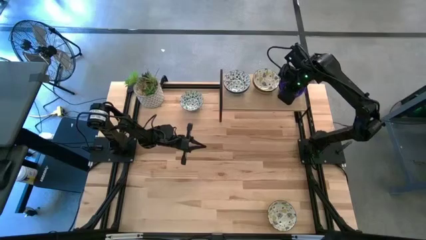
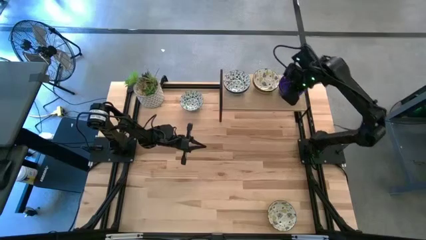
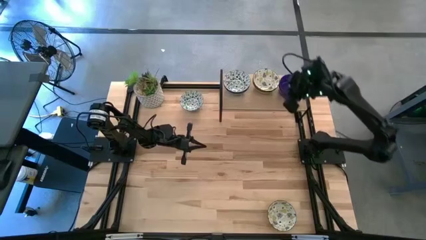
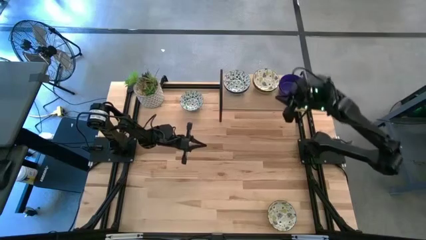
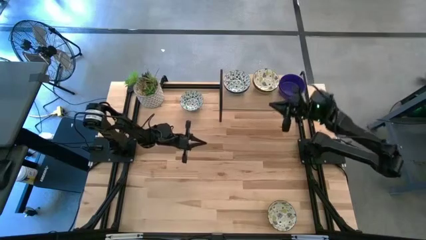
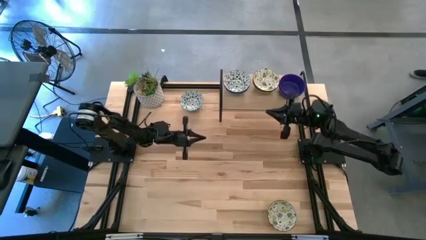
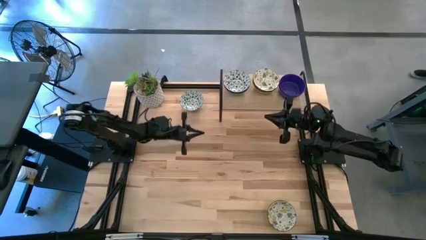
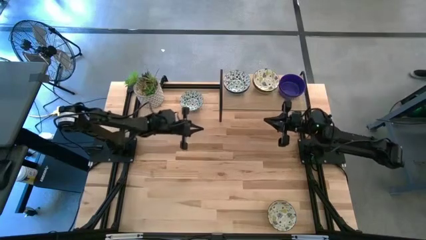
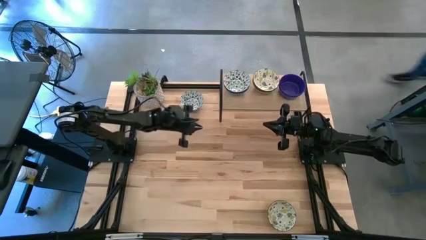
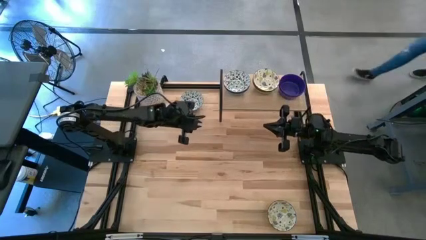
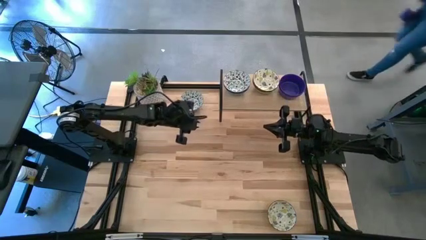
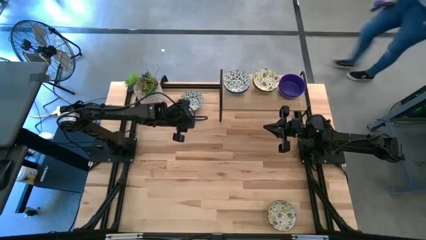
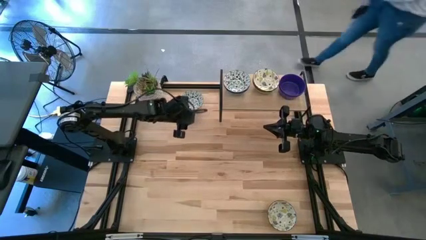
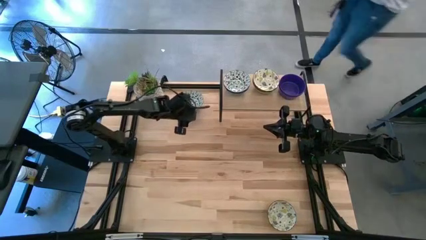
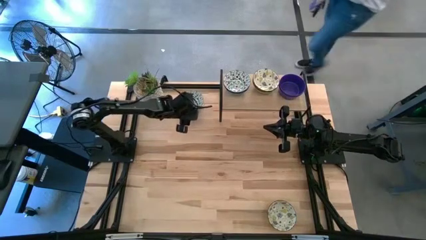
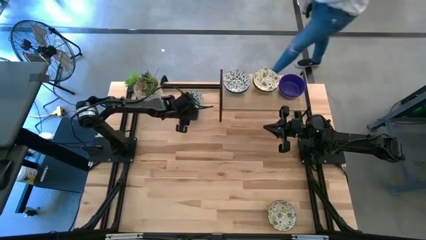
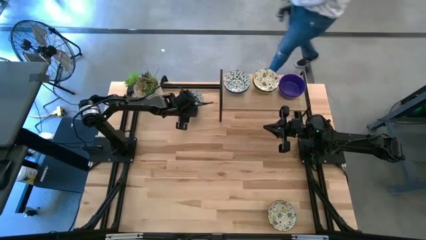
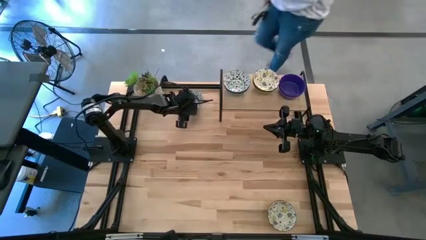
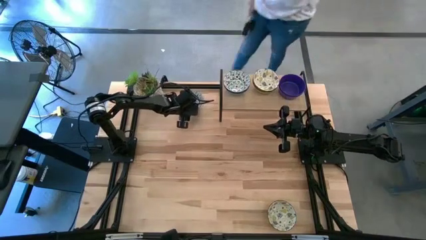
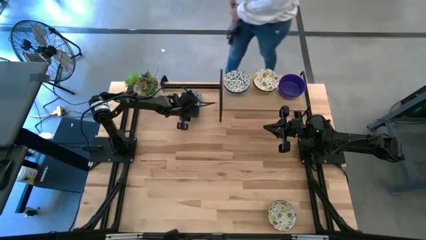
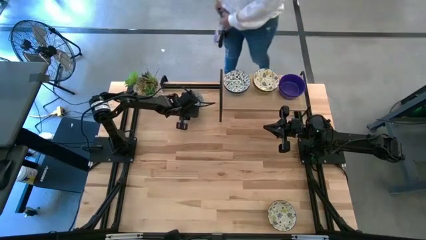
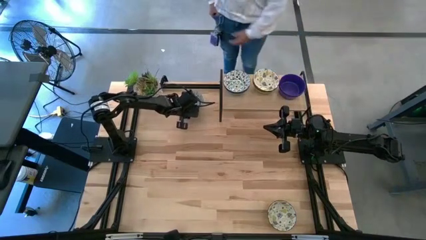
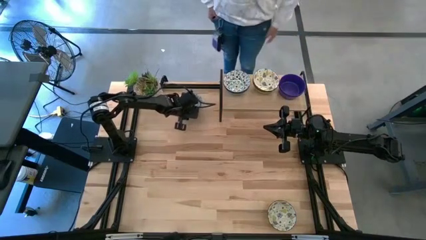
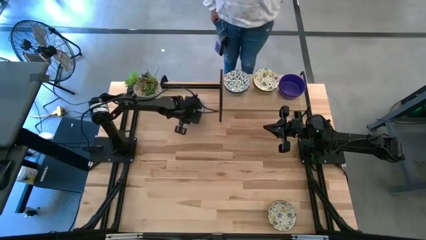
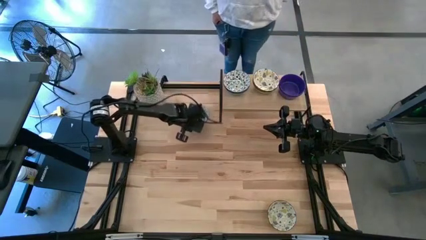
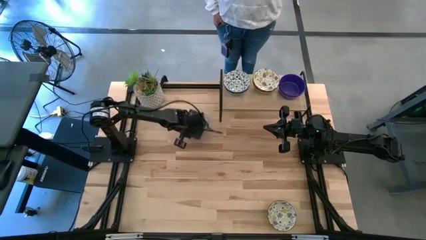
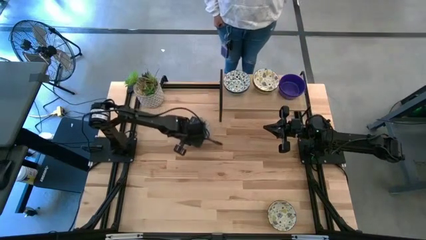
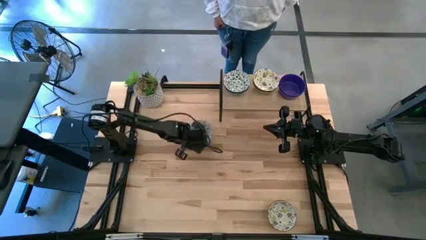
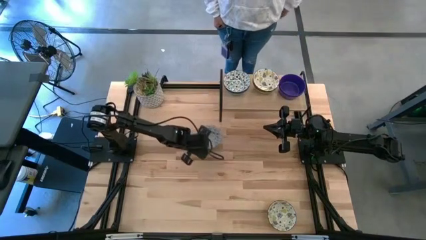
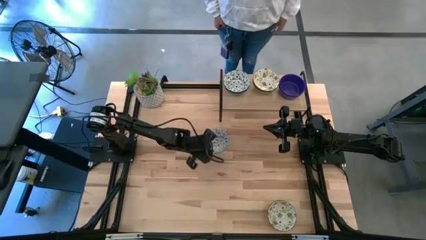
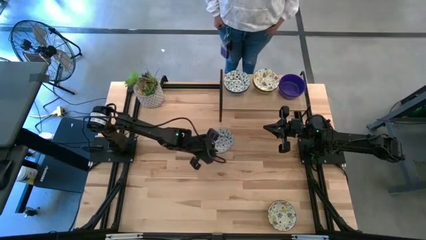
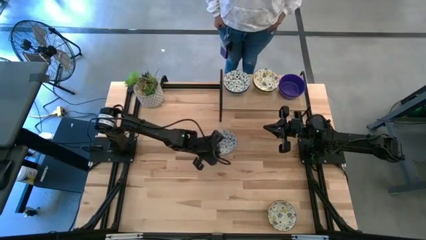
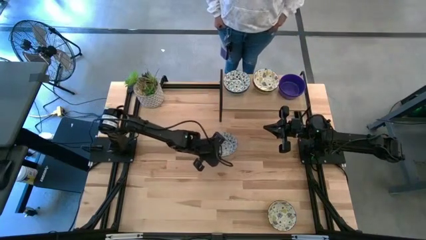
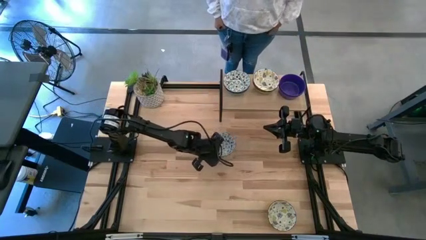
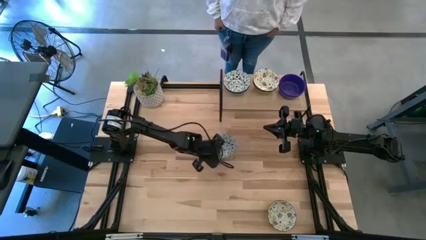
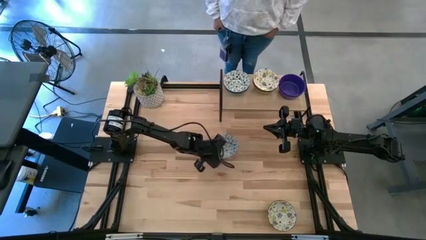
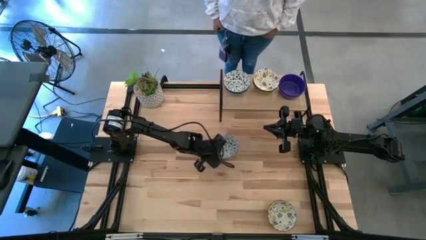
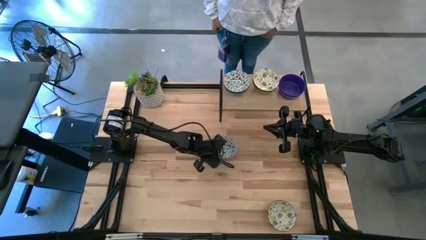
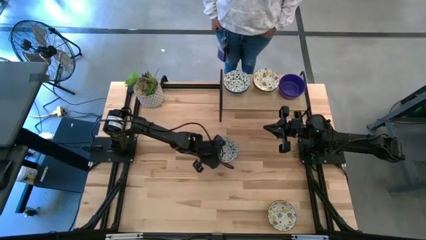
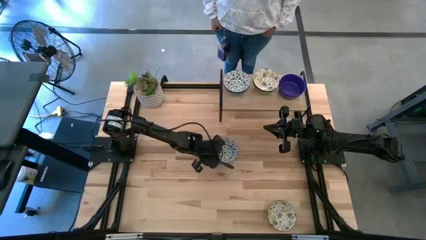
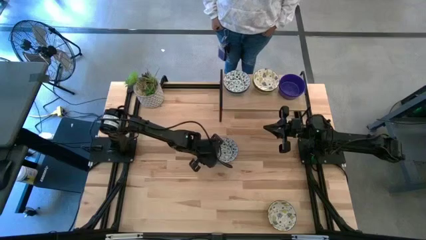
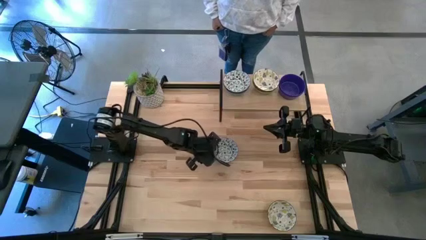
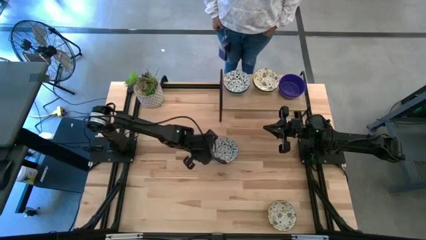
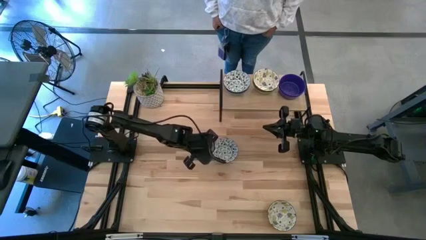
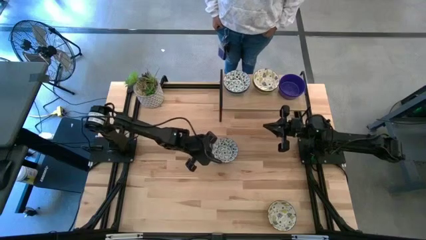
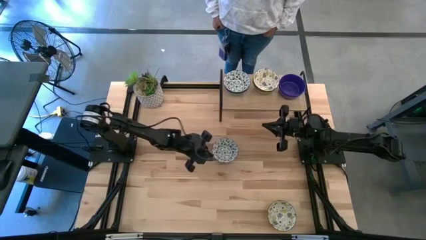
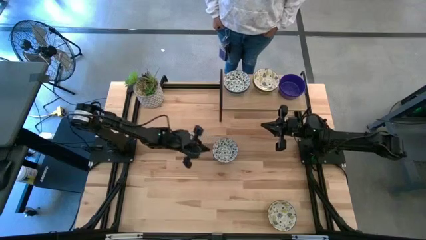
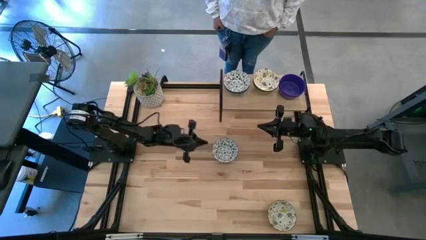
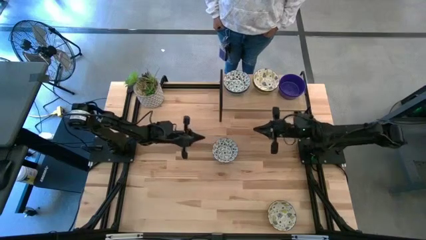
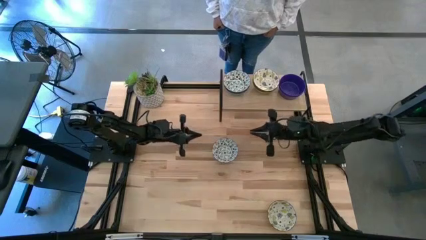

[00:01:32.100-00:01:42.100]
Task: Pick & Place Mini bowls
Stack the blue patterned bowl on the blue patterned bowls on the shelf

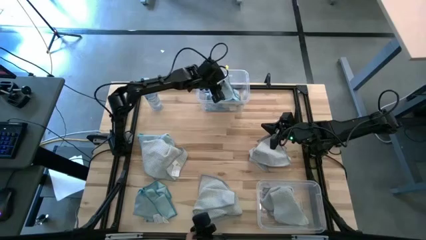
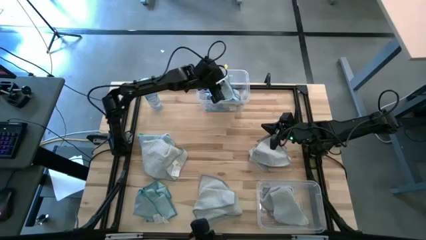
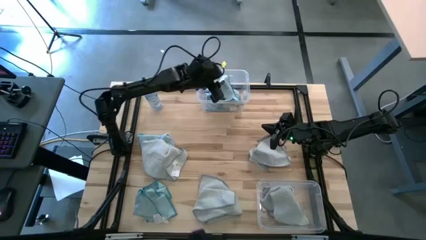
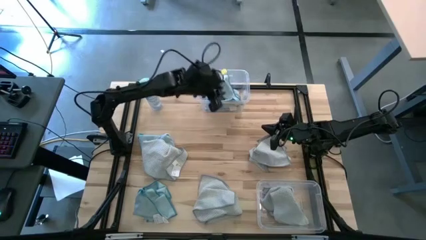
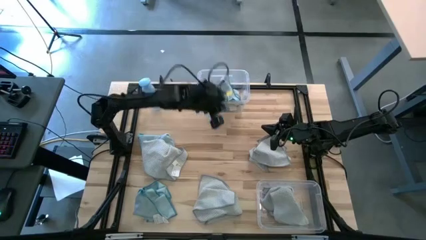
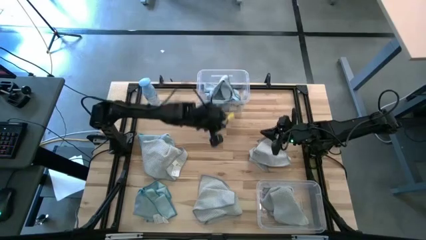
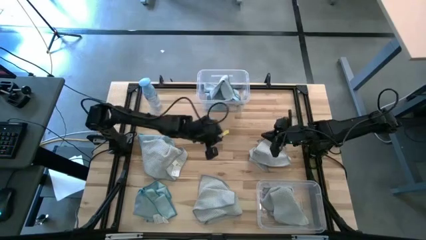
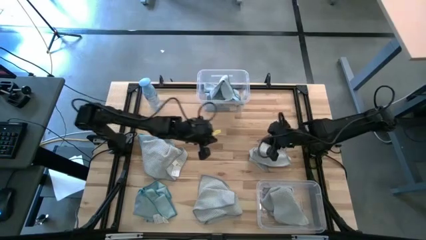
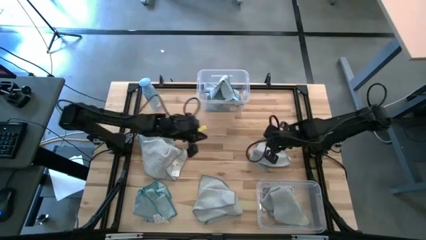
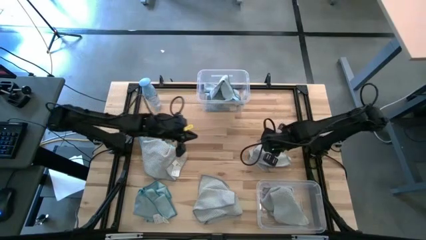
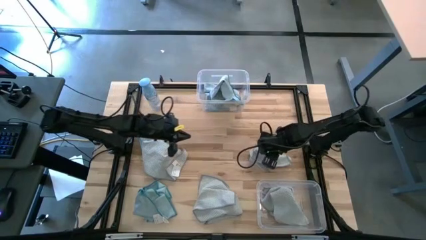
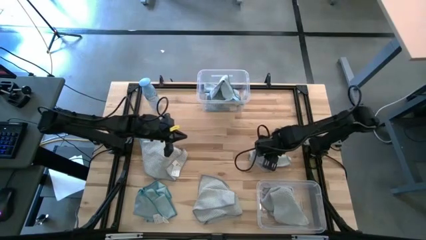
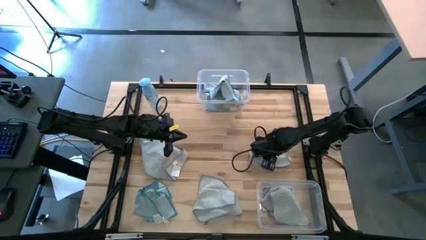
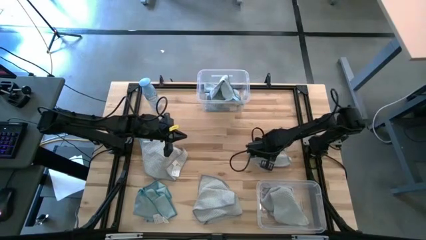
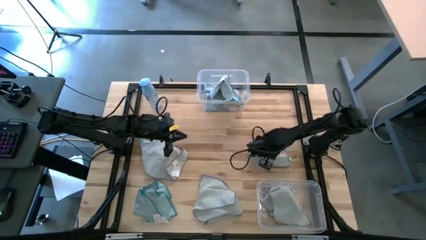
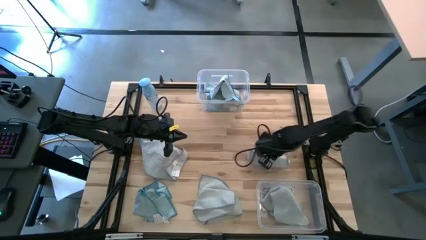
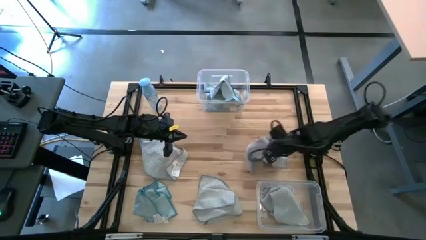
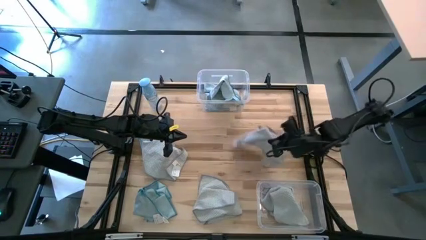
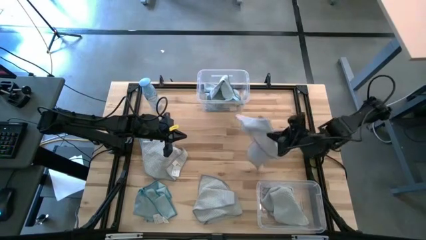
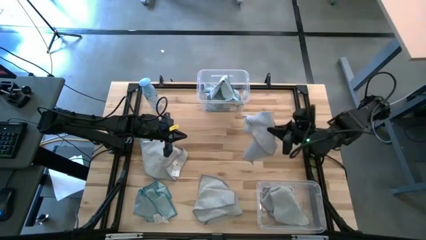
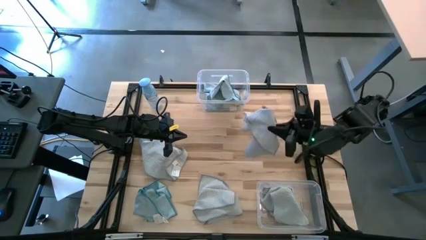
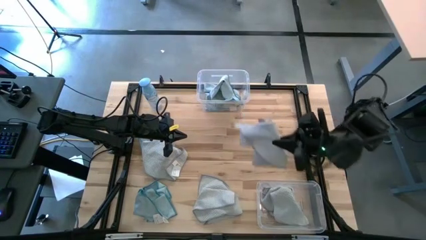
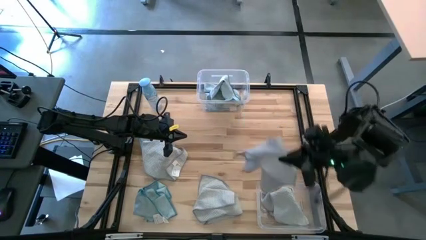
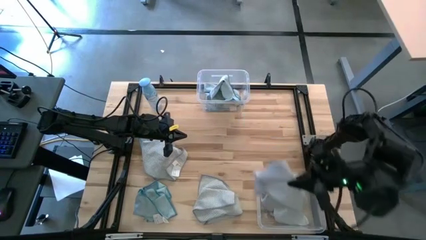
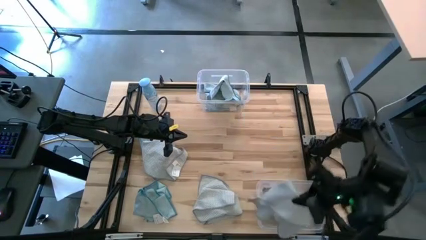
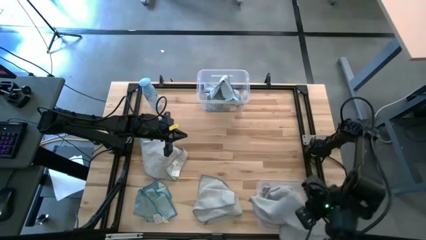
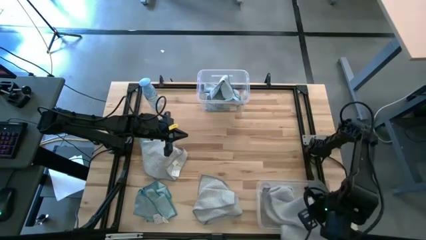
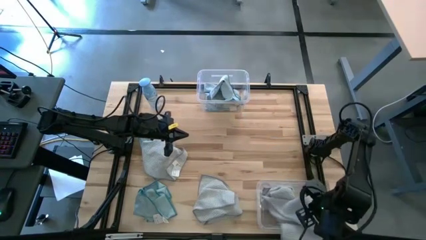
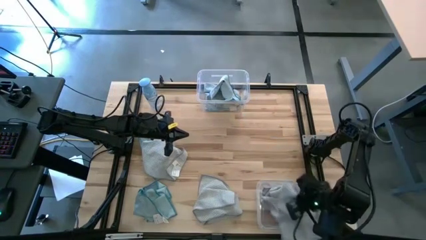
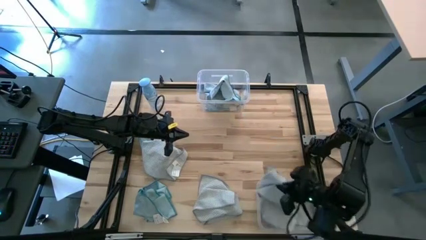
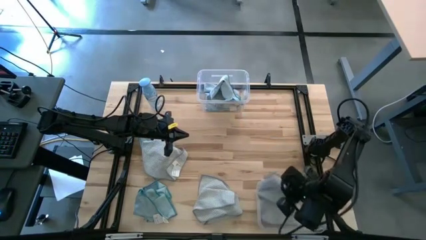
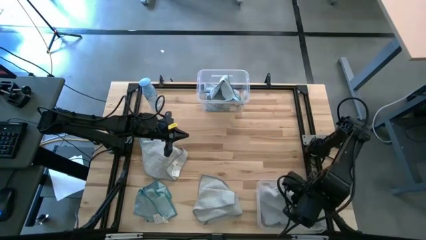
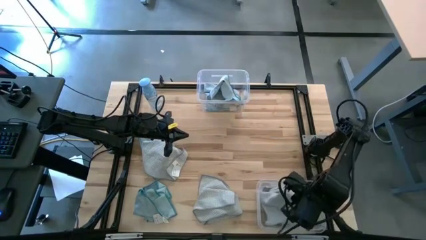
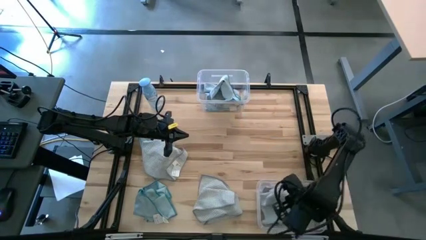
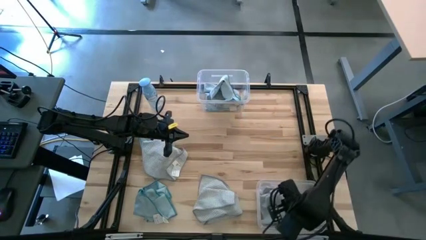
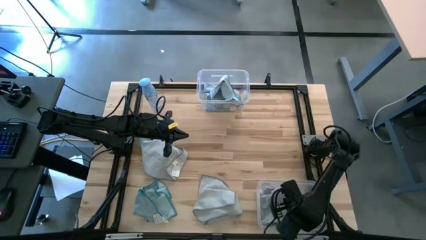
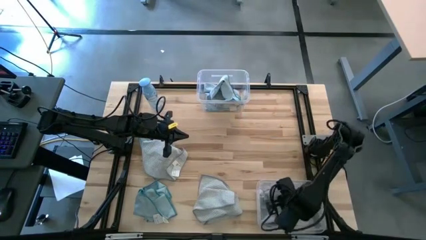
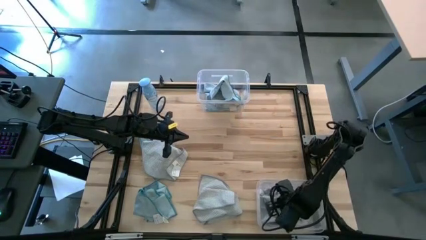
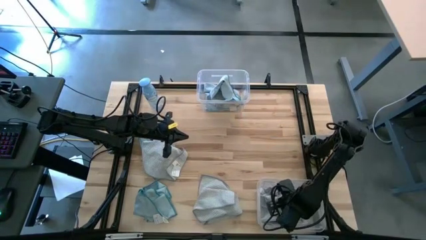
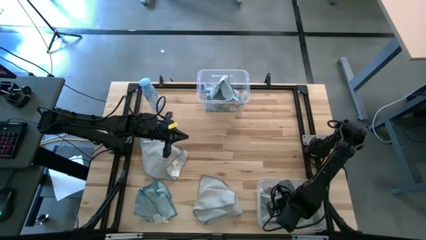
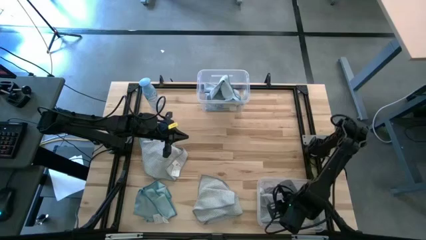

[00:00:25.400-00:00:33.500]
Task: Sort microfiber towel by color & place in baskets
Put the gray towel into the bottom transparent bin
